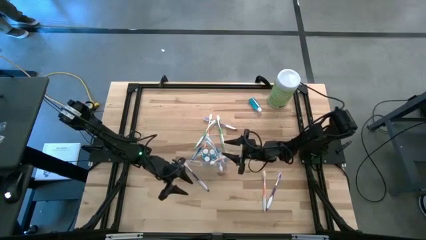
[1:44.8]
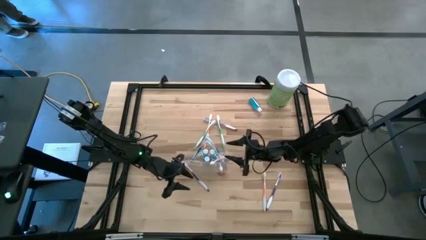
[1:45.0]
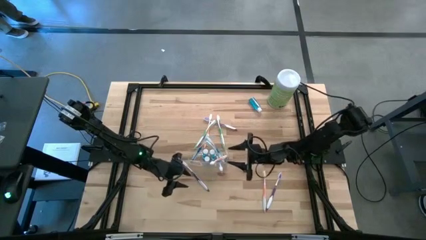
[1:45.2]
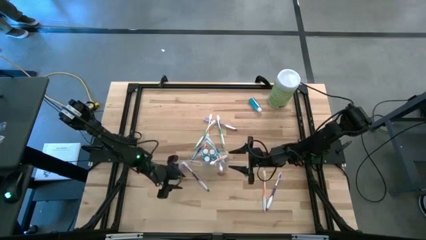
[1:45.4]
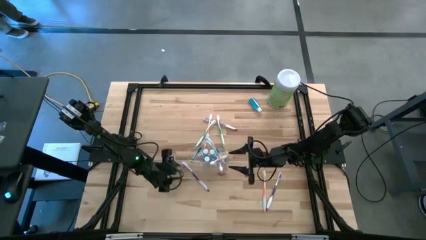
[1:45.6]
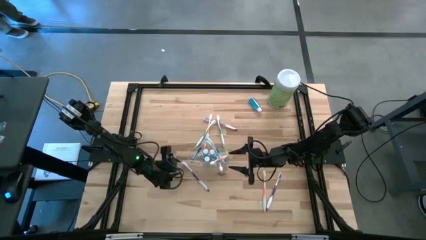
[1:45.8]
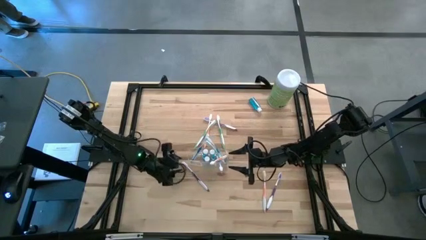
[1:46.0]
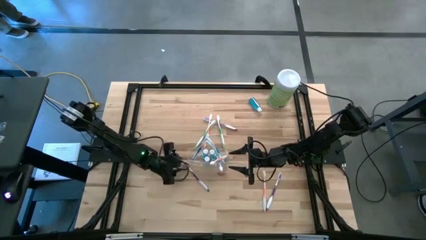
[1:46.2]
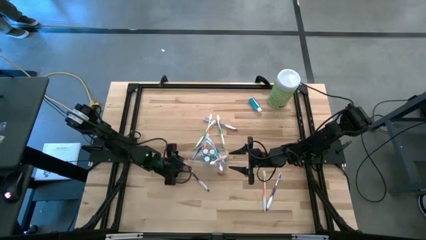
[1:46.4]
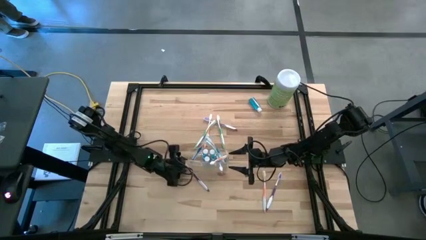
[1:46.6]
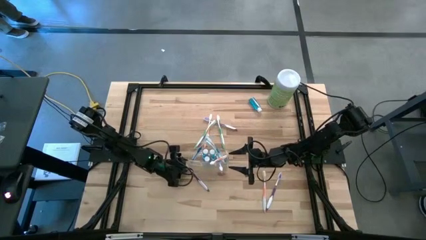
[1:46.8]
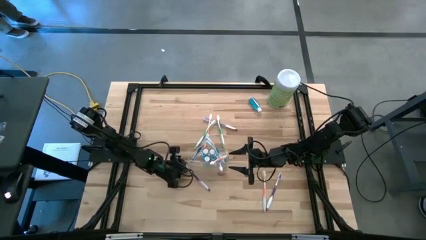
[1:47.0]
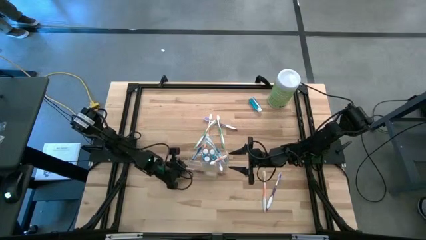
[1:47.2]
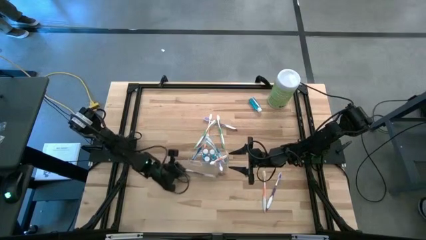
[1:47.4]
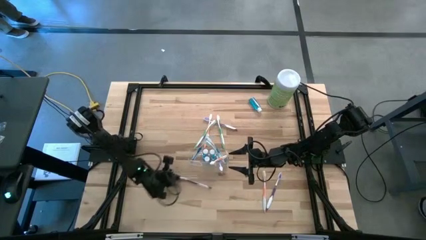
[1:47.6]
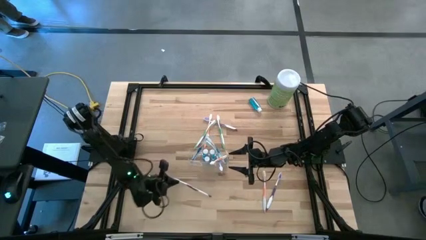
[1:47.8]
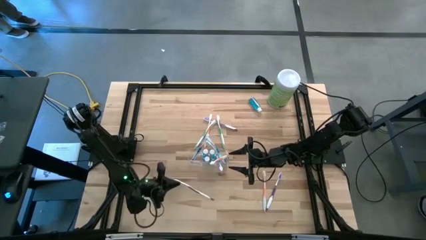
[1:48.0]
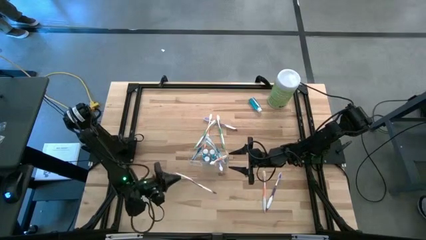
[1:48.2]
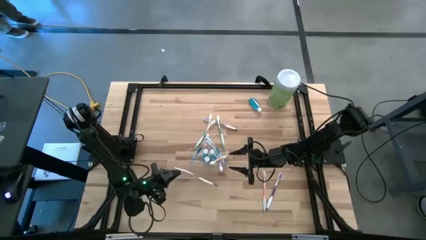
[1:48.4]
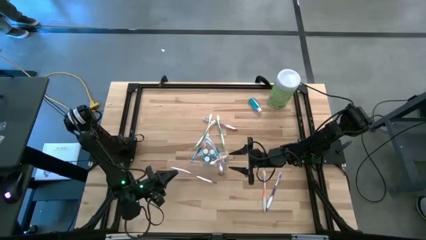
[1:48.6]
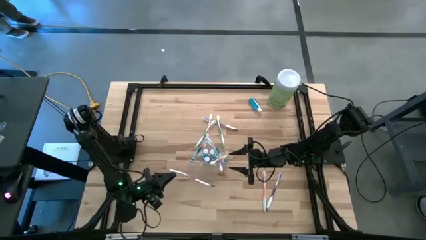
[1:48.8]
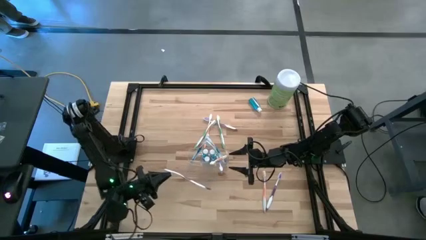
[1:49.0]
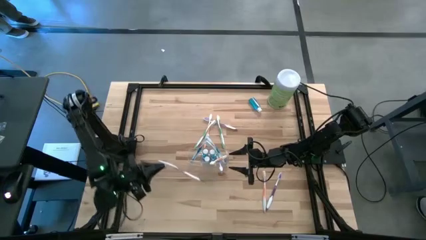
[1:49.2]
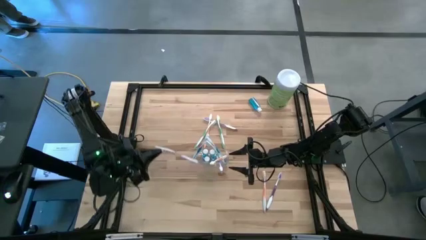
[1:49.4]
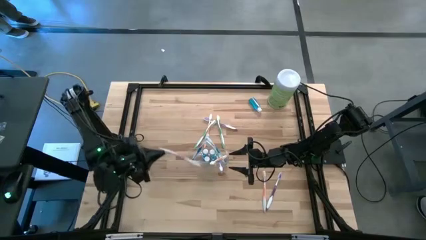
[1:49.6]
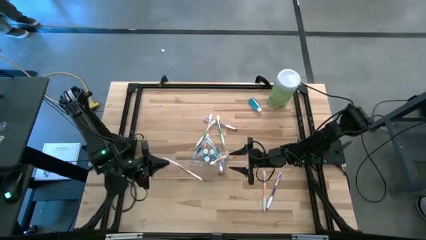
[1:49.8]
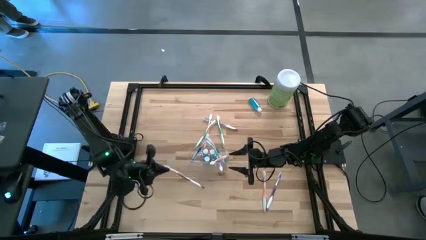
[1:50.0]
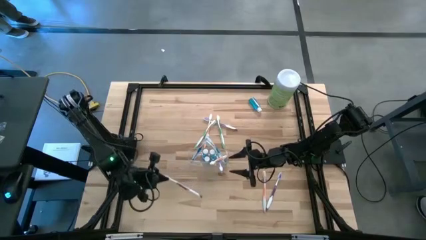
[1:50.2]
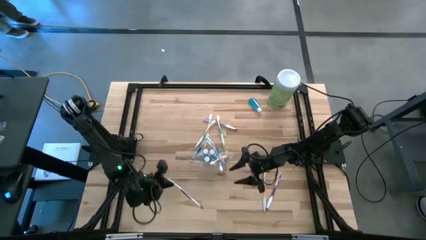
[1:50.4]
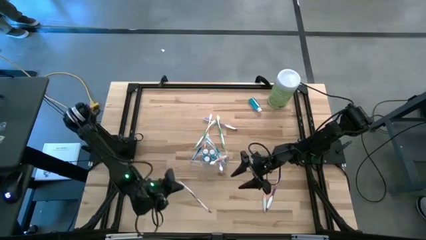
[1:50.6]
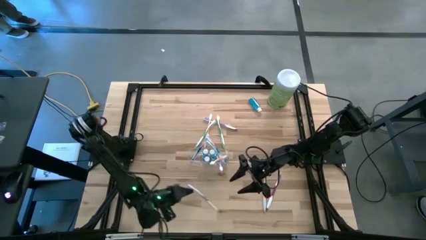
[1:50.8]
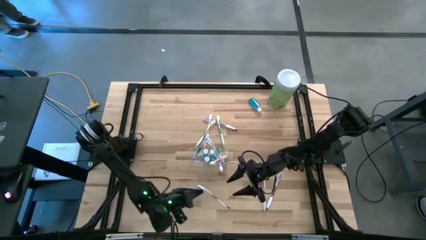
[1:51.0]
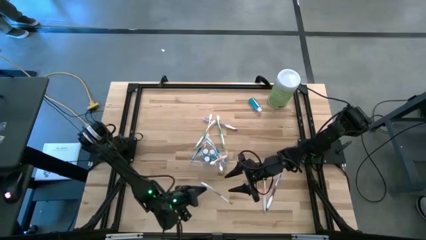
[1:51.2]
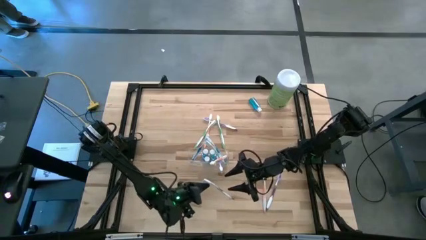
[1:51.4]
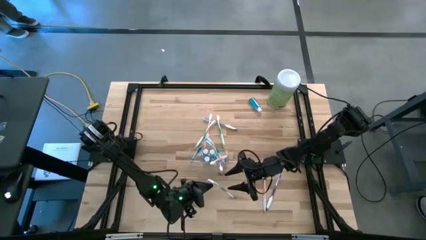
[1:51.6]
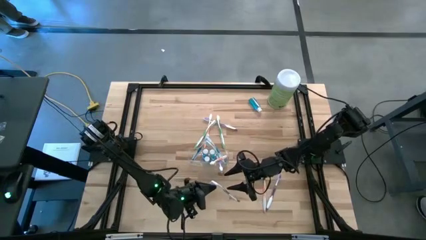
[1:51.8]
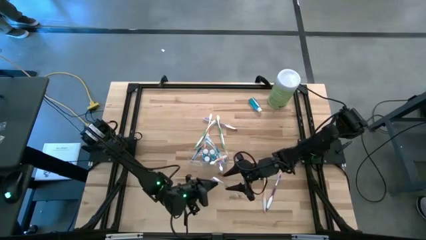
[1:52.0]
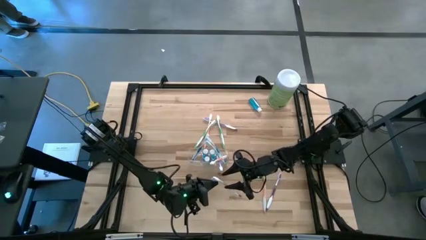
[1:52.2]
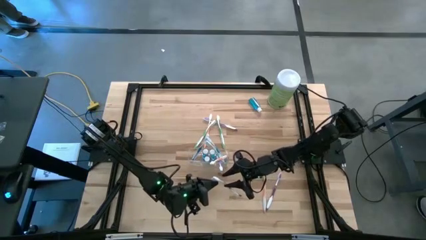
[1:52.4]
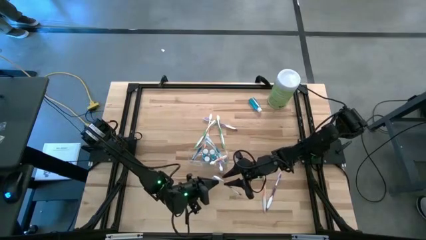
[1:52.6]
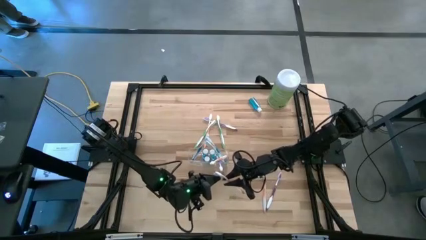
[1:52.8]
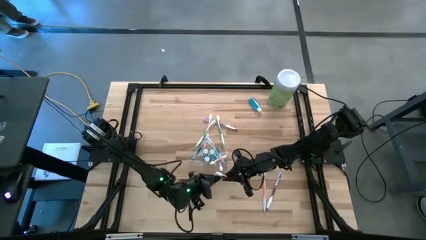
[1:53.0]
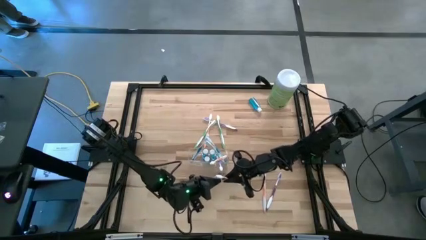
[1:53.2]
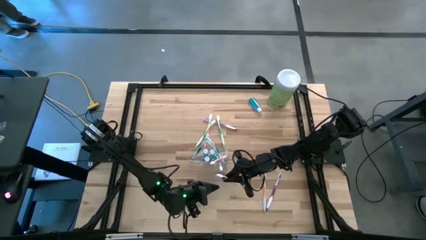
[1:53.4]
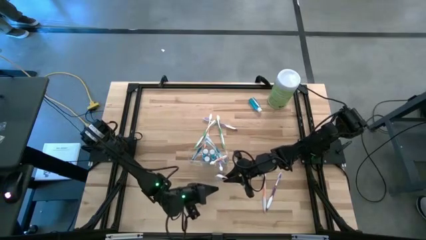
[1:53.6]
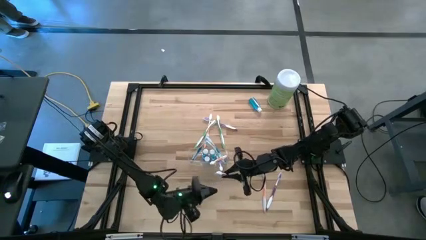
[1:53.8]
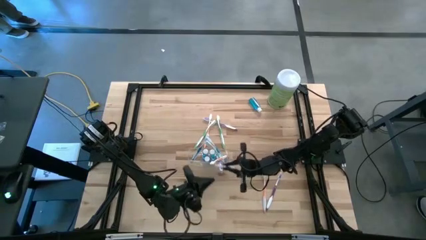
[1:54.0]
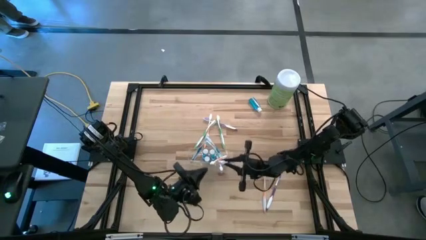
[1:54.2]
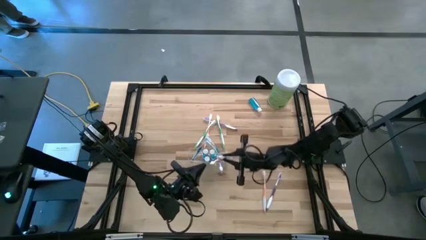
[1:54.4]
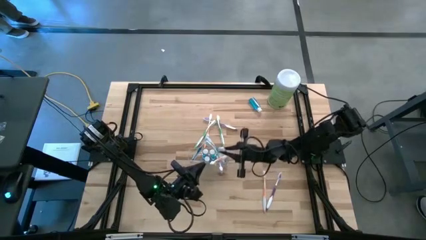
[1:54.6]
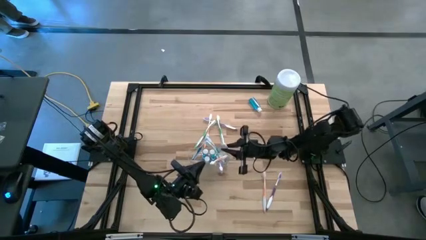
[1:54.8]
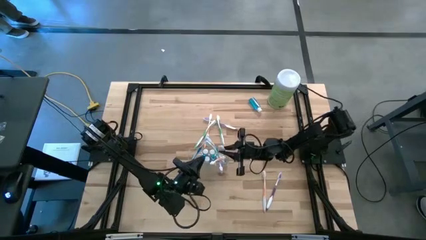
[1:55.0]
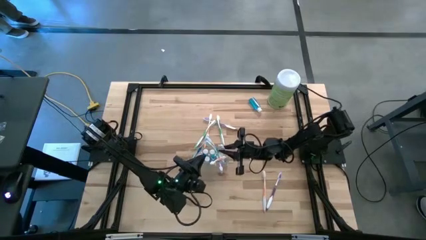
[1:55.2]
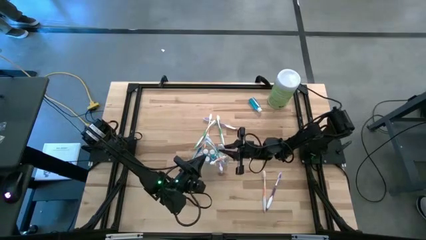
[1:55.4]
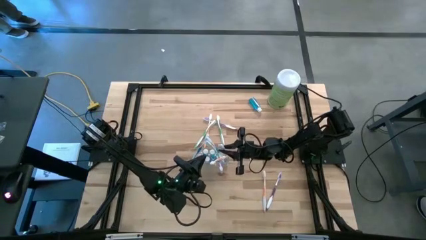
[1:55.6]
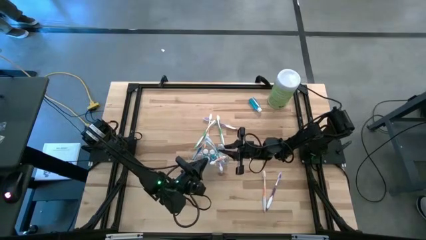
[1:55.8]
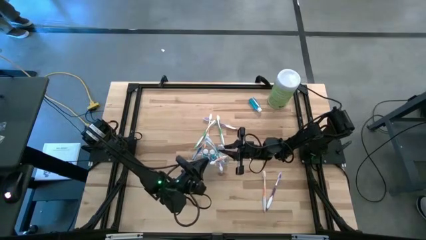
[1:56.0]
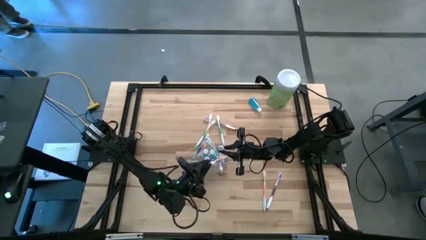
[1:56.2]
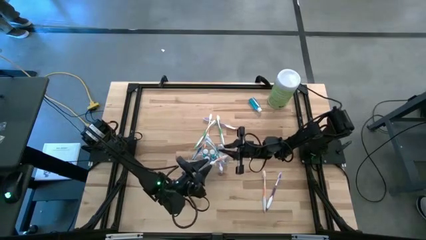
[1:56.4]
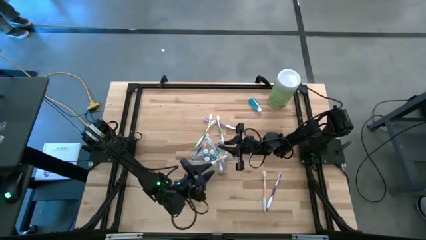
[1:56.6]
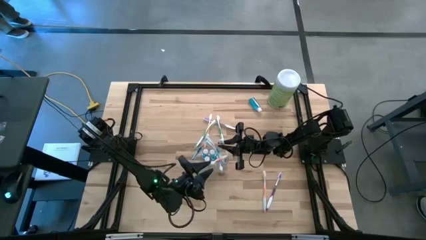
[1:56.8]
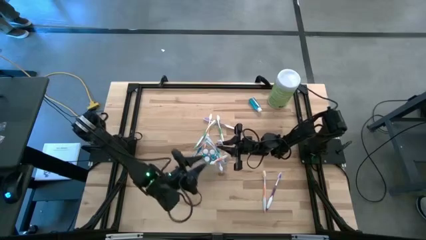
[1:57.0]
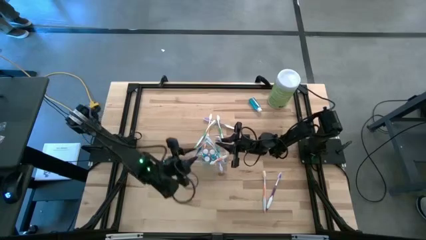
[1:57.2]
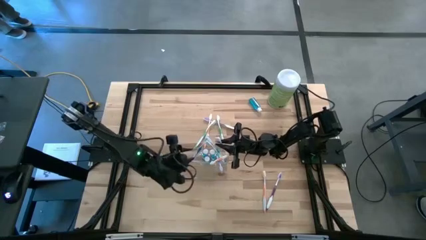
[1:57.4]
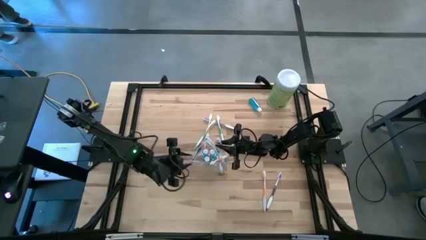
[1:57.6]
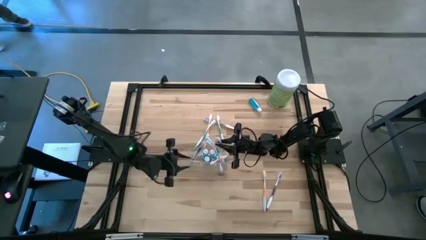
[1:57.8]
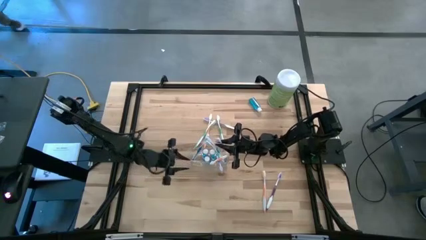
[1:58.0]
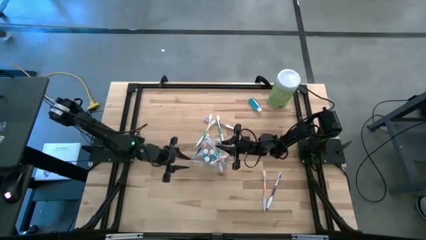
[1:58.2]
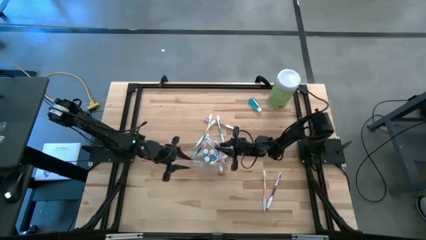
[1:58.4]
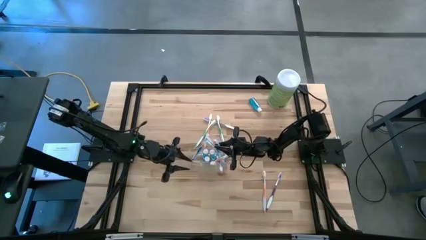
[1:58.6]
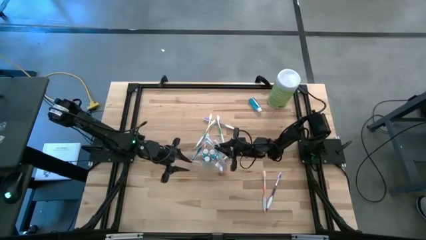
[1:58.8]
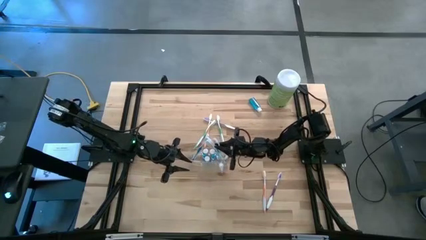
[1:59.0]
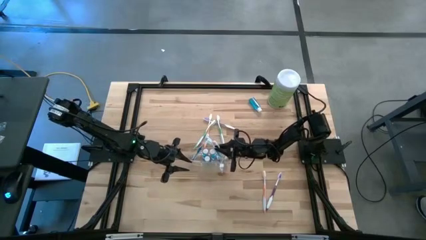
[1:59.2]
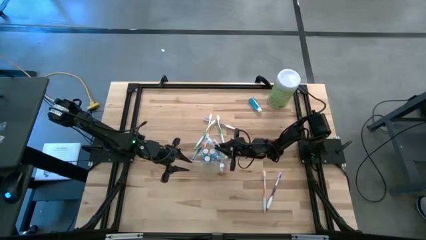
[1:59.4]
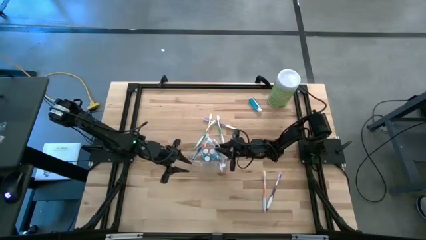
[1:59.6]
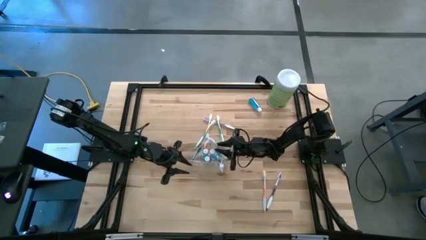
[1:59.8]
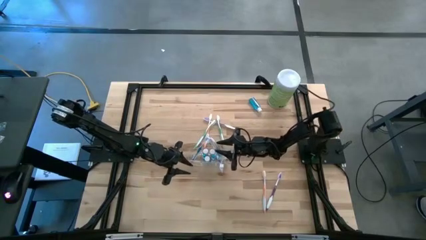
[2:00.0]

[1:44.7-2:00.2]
Task: Pick & Place toothbrushing station
Put the purple toothbrush into the right side of the transparent organizer
